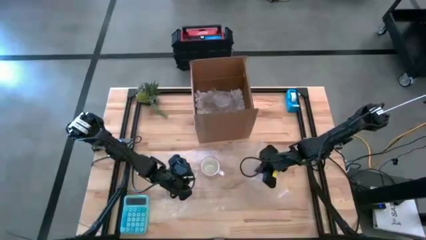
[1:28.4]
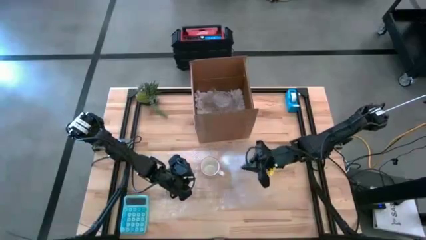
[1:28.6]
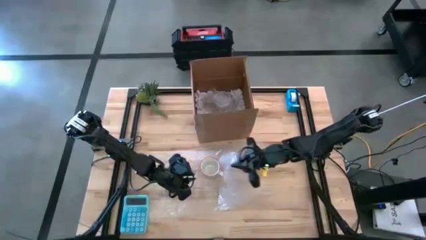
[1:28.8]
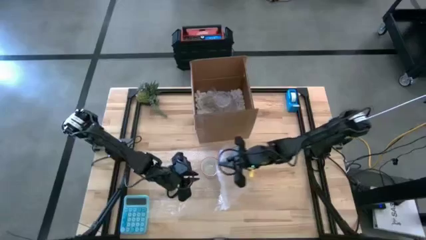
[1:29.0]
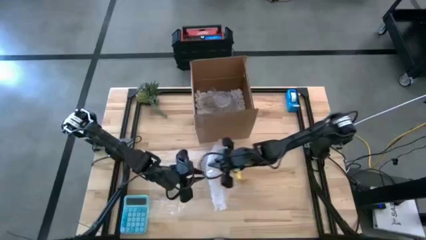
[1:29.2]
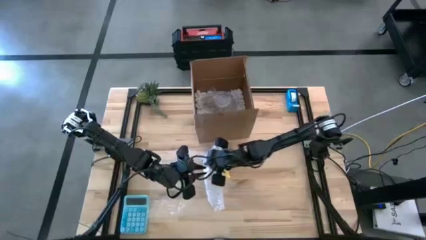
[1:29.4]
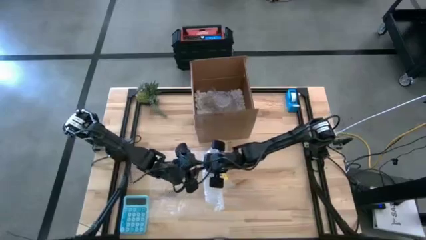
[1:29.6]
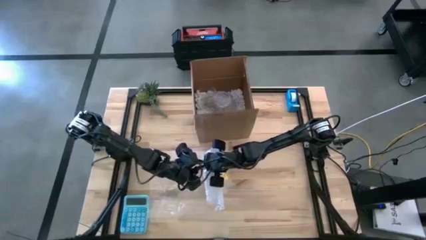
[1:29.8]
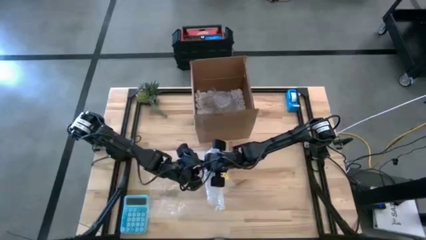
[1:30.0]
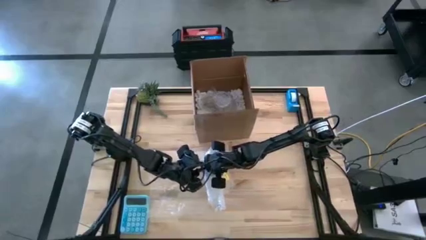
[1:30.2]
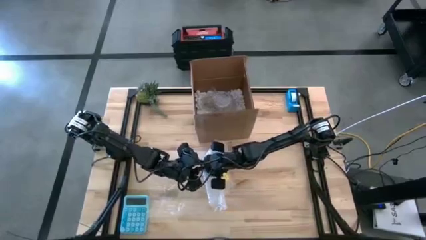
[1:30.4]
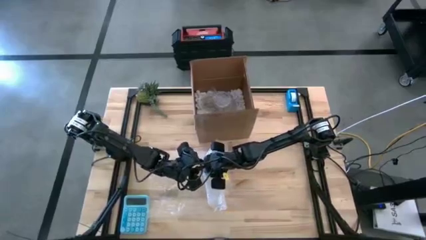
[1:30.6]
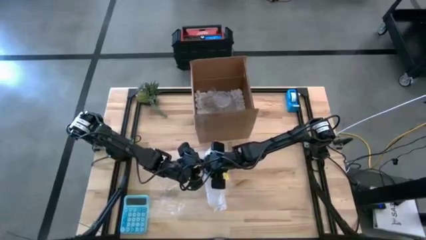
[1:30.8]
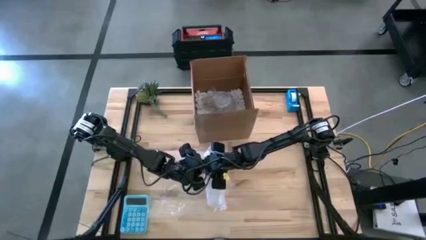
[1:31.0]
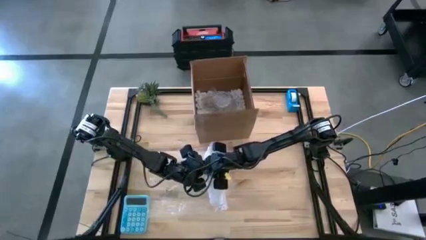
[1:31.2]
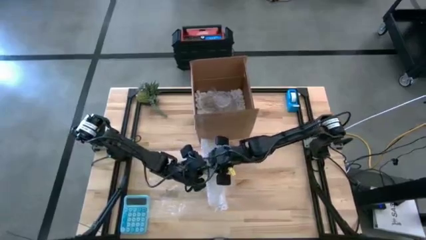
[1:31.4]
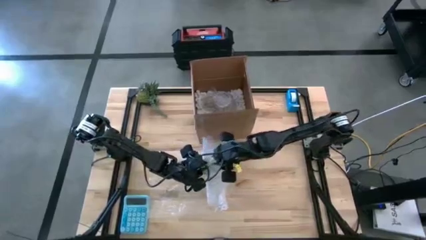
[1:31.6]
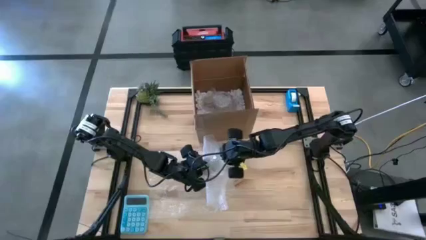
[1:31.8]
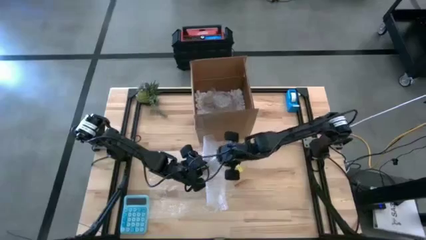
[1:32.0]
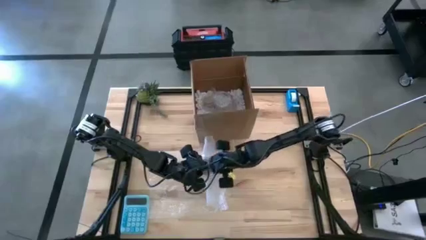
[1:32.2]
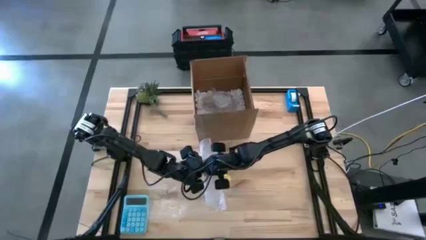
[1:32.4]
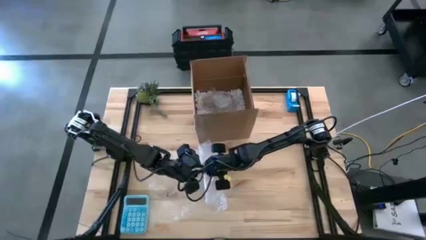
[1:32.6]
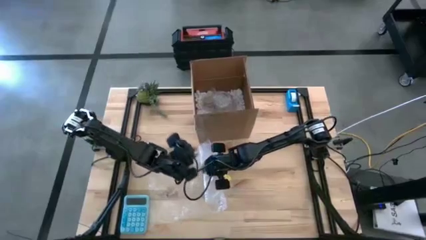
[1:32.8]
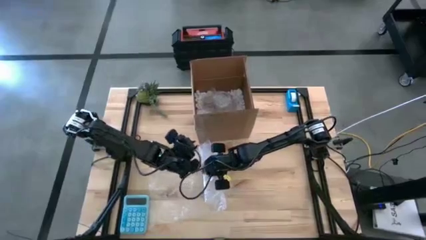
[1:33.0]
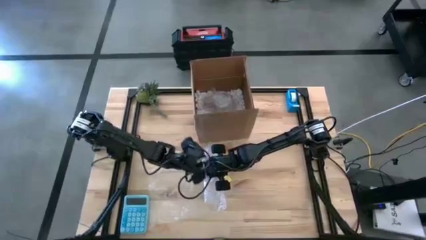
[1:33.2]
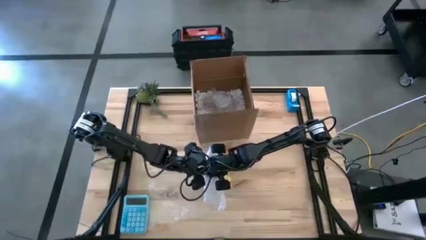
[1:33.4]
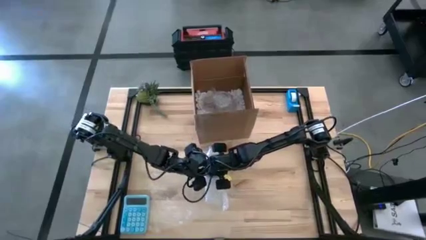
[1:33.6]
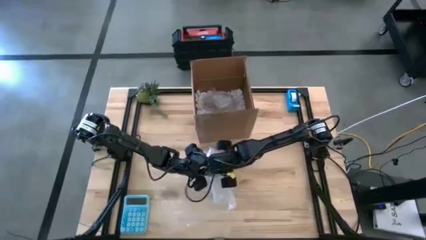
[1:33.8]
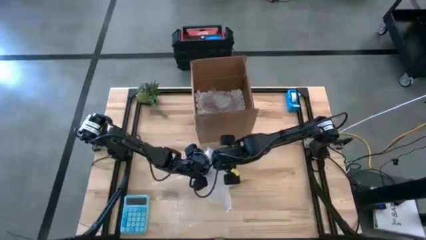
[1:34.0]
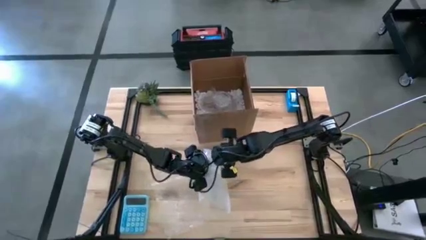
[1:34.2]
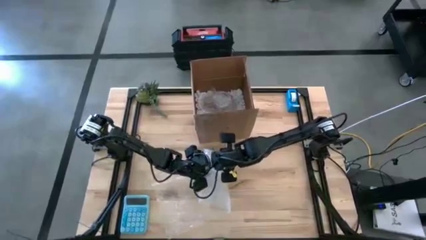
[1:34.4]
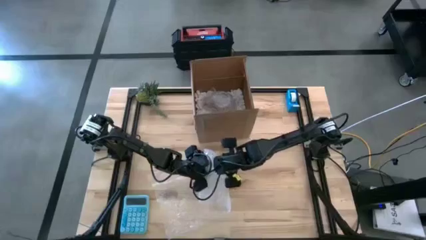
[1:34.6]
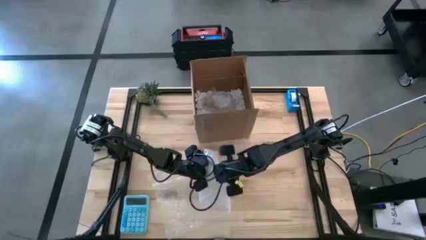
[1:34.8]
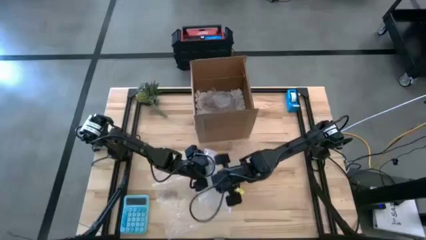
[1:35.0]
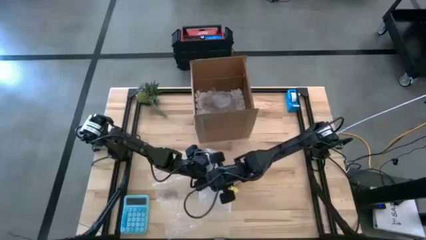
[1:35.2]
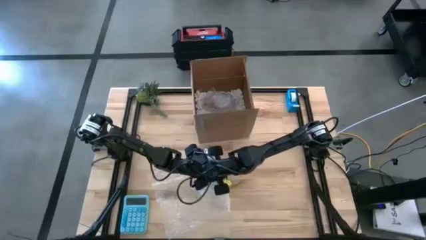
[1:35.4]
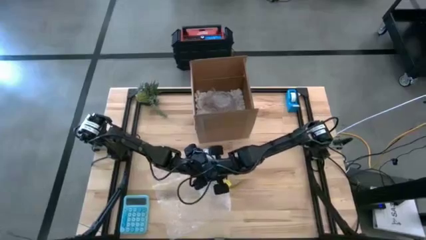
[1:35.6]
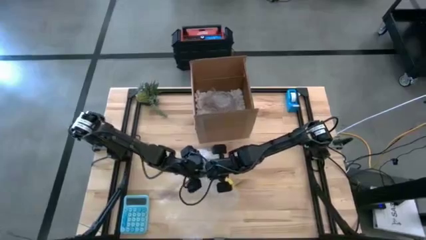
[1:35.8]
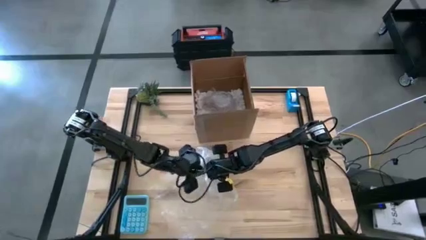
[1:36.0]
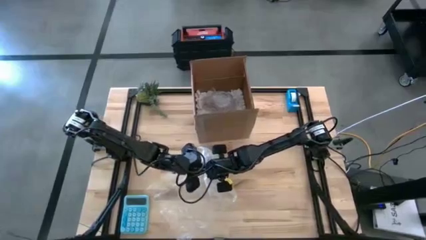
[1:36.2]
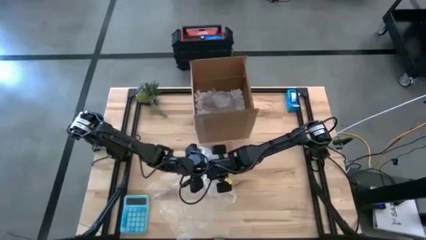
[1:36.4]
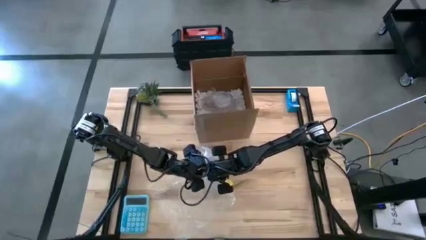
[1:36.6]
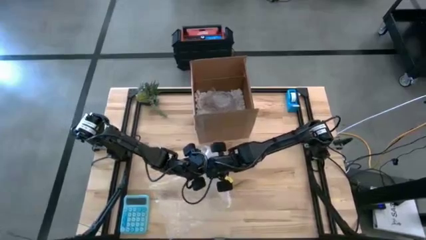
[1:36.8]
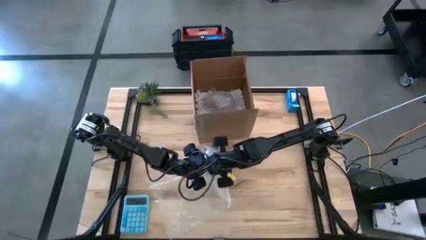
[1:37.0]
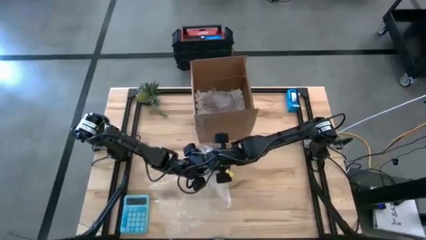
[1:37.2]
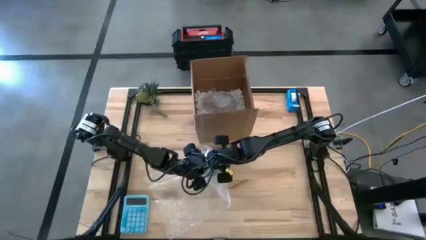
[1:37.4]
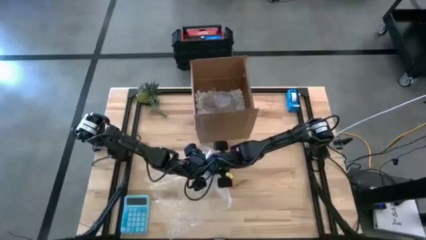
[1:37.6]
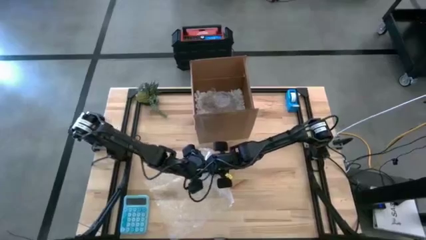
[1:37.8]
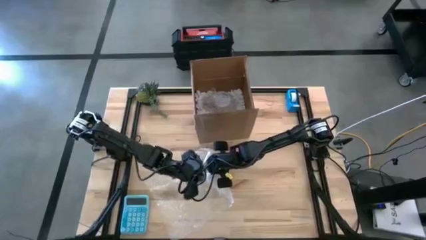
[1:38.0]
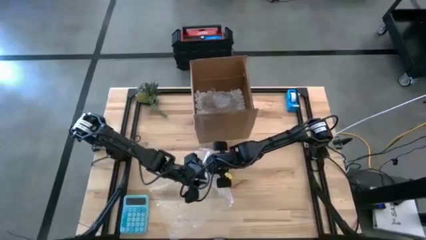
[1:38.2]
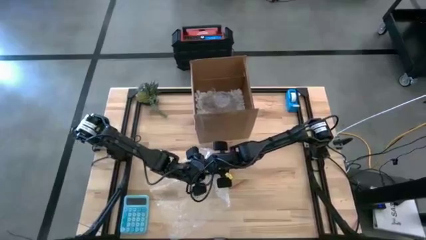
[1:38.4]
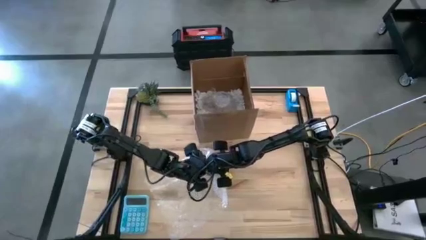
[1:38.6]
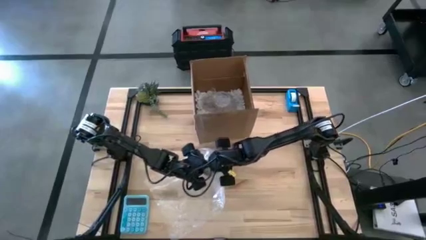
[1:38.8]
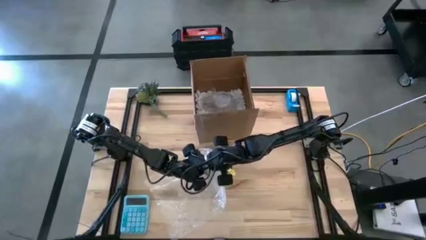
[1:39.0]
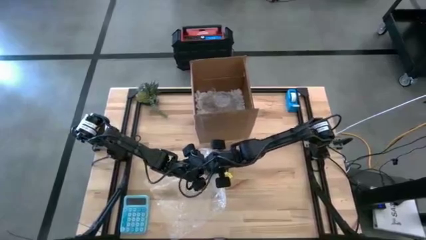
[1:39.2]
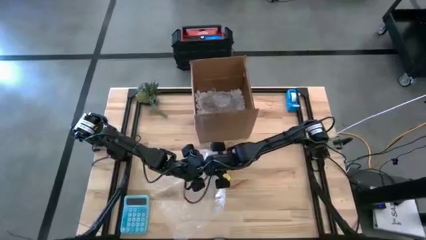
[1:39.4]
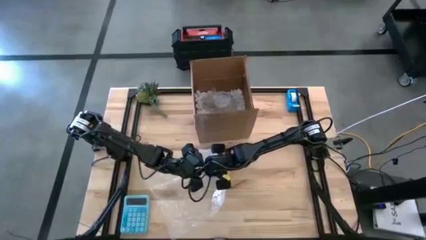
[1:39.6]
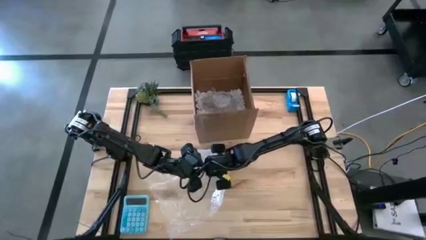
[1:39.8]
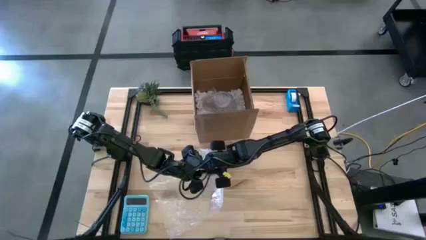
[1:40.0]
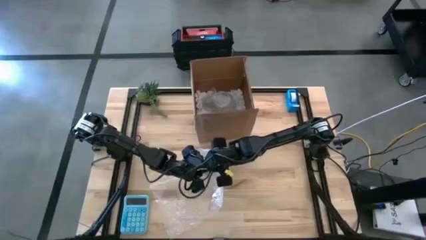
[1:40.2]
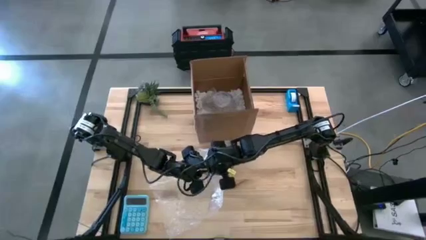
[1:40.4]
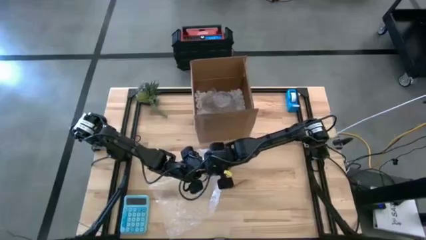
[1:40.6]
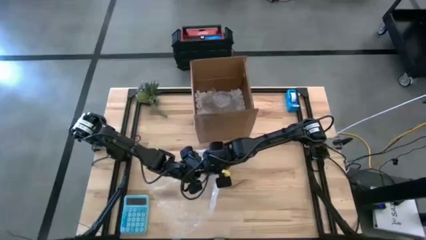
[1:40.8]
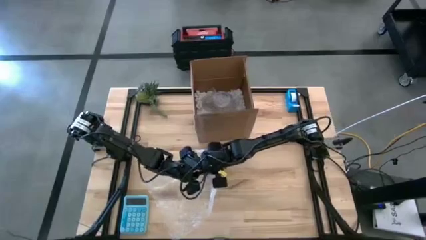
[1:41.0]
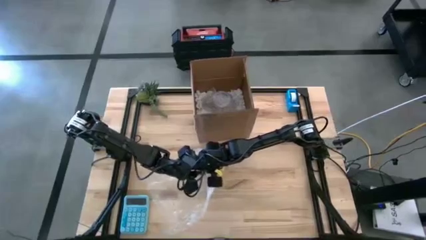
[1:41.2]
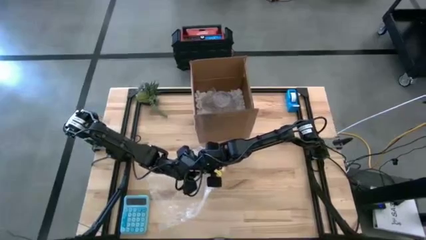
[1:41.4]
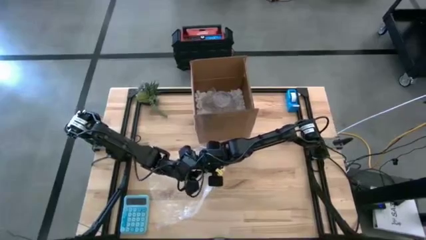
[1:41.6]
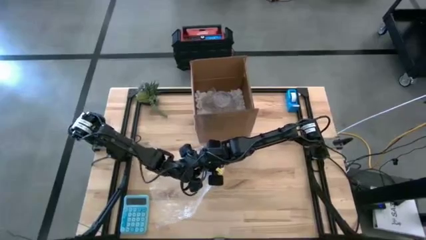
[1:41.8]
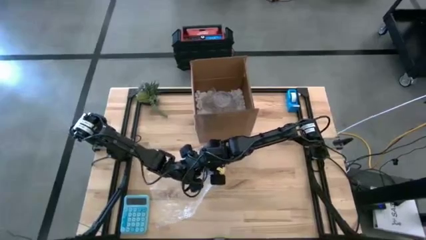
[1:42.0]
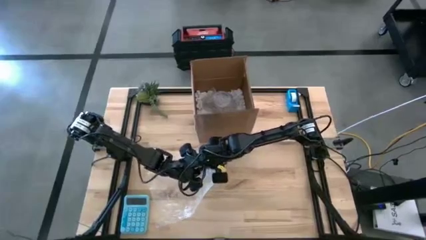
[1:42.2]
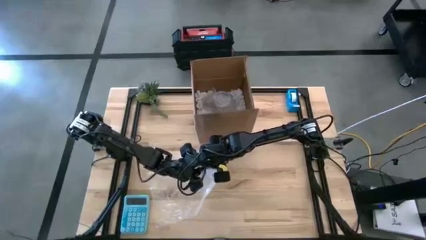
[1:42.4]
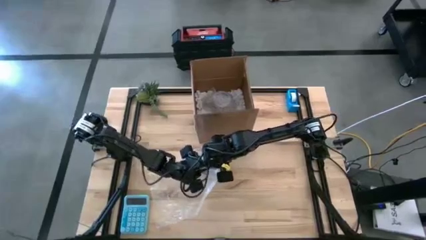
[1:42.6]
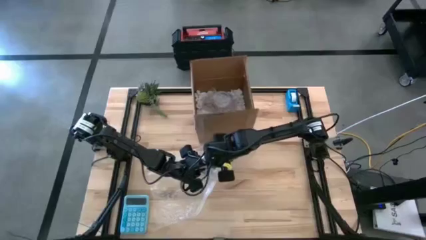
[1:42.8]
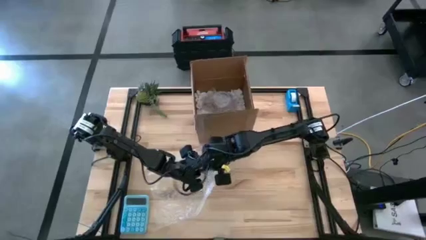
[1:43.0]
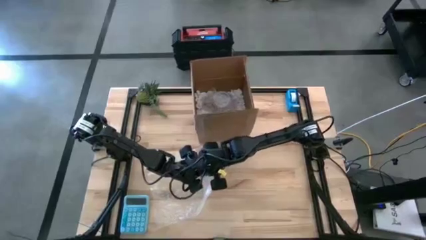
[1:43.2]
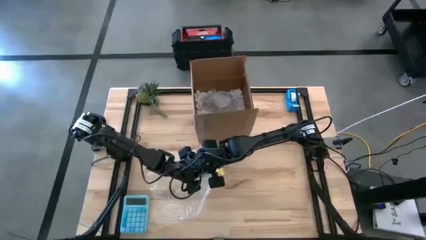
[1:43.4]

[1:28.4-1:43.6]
Task: wrap mug
Wrap the gray mug with the bubble wrap

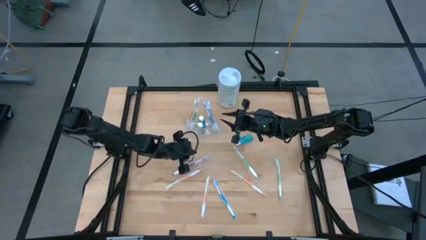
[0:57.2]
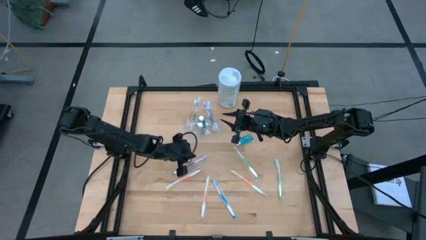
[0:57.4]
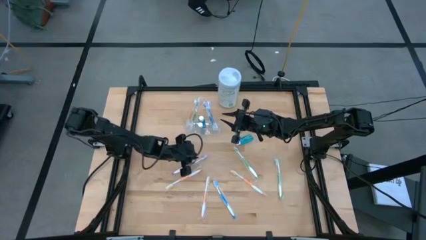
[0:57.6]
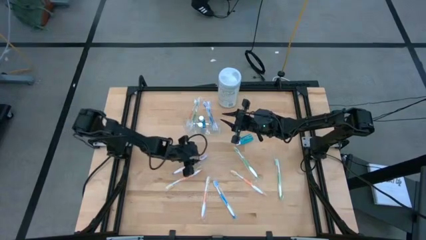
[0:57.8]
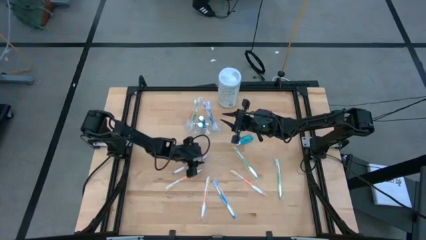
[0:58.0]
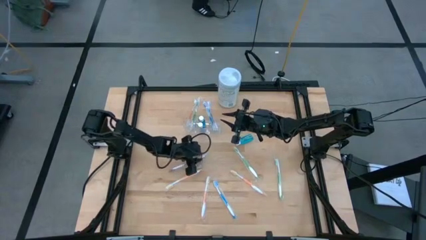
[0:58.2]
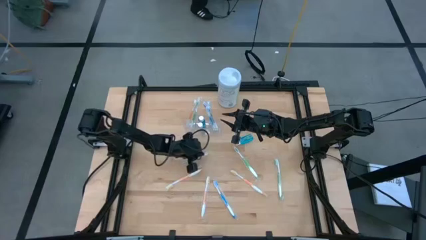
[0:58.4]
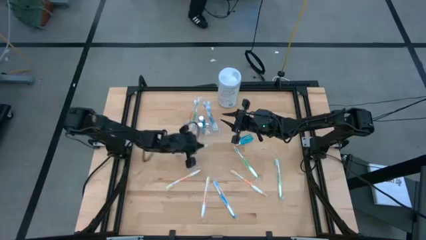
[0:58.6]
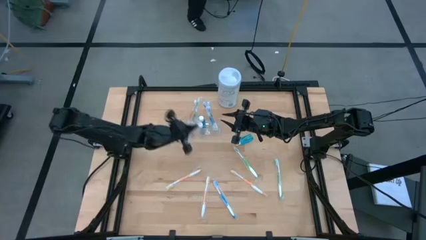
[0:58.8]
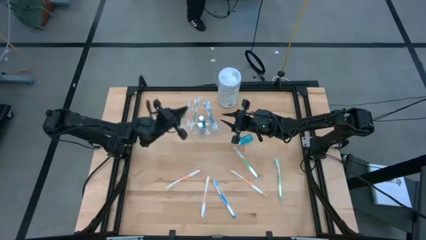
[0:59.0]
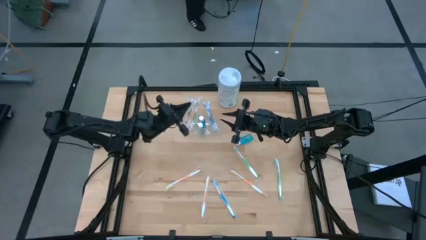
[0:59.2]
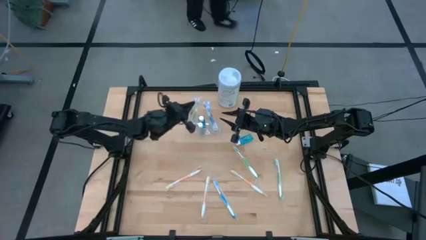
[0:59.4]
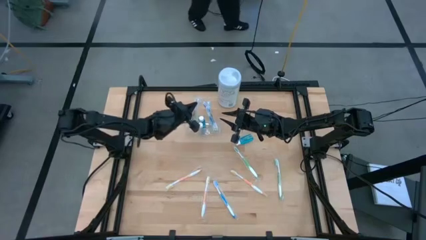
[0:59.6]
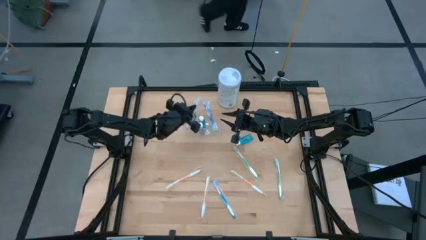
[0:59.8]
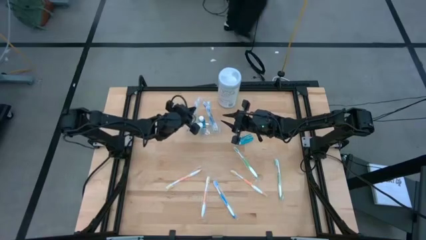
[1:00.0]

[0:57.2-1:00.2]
Task: Pick & Place toothbrushing station
Put the purple toothbrush into the transparent organizer
